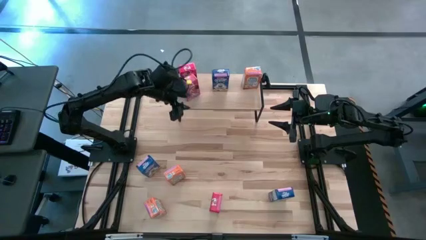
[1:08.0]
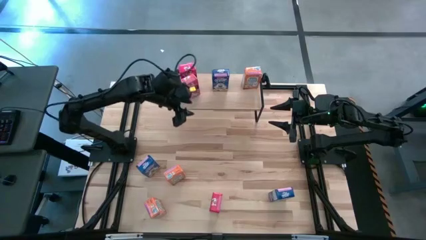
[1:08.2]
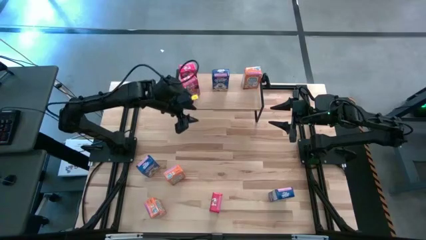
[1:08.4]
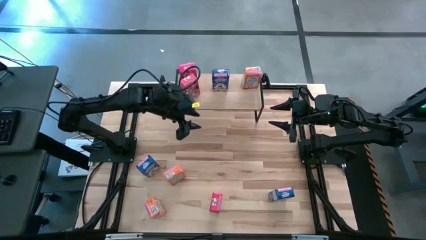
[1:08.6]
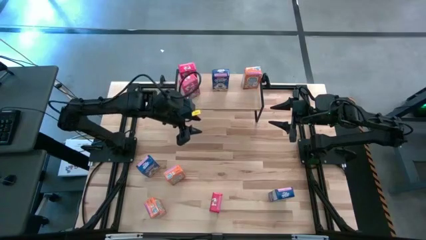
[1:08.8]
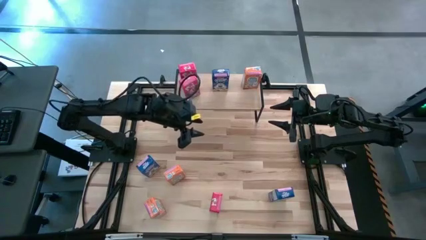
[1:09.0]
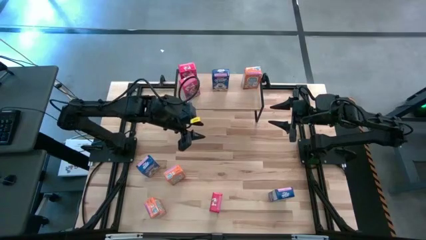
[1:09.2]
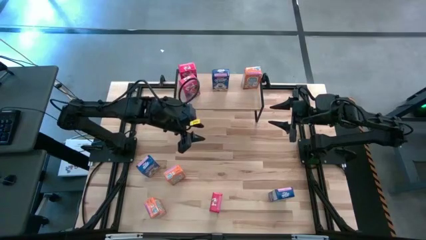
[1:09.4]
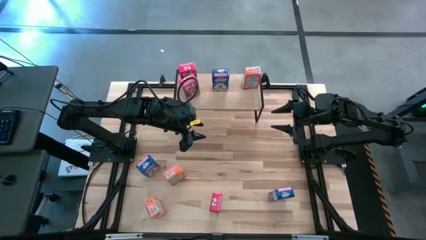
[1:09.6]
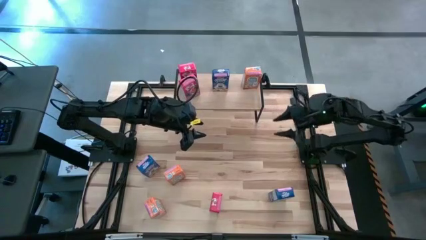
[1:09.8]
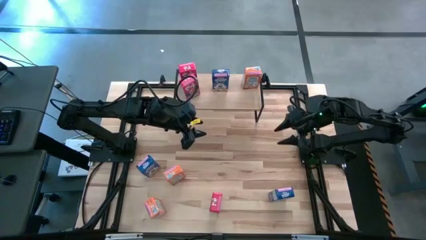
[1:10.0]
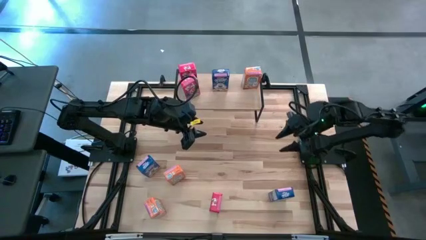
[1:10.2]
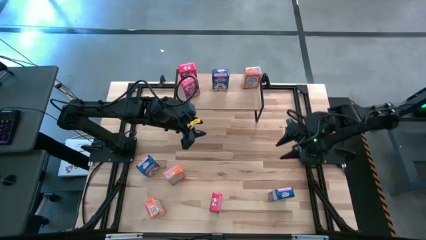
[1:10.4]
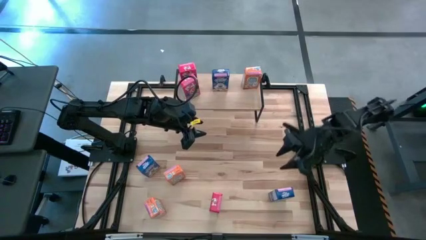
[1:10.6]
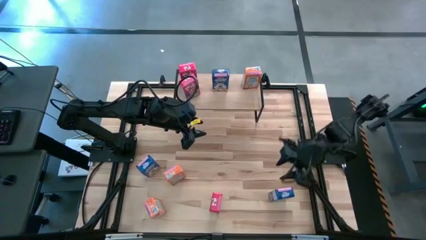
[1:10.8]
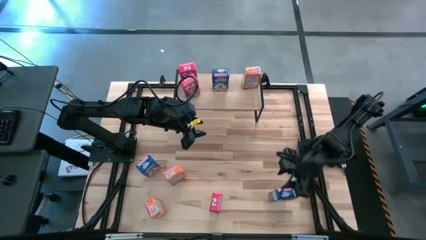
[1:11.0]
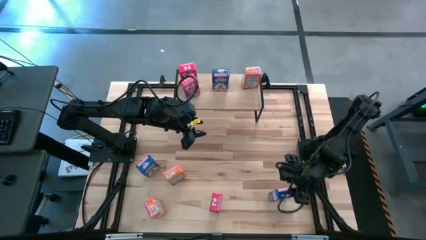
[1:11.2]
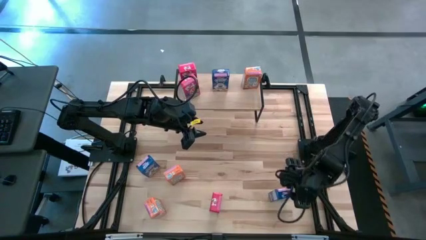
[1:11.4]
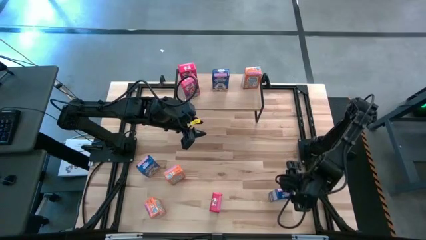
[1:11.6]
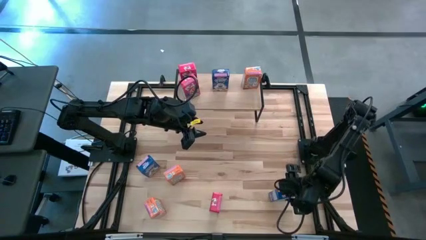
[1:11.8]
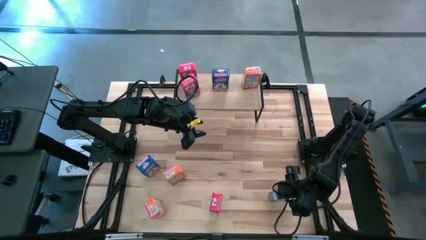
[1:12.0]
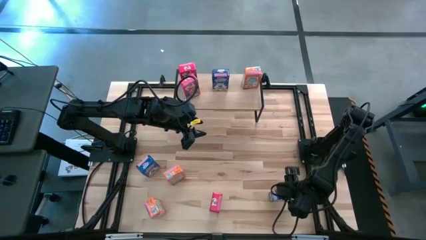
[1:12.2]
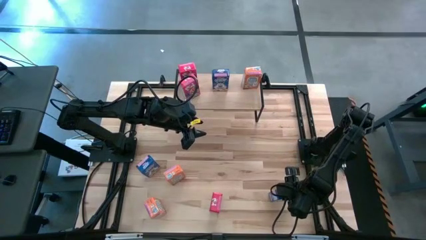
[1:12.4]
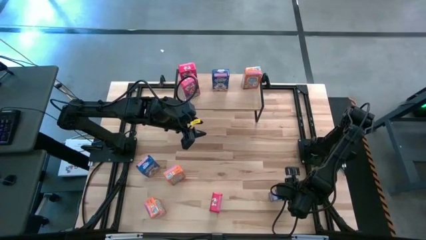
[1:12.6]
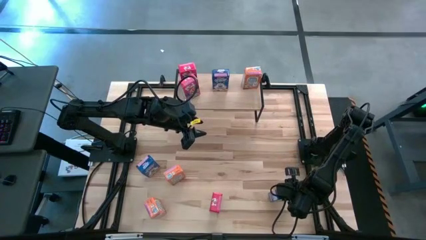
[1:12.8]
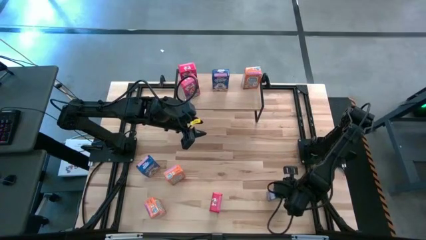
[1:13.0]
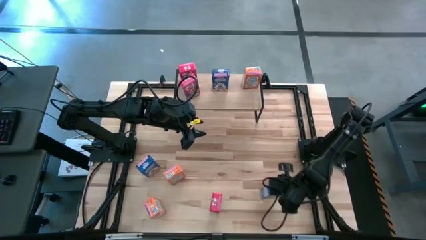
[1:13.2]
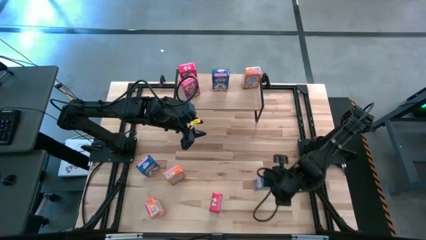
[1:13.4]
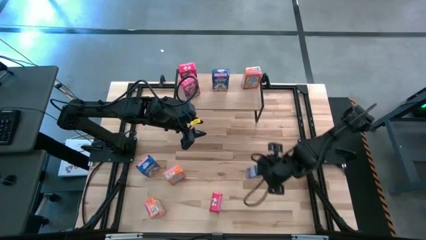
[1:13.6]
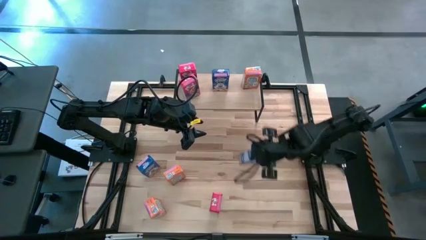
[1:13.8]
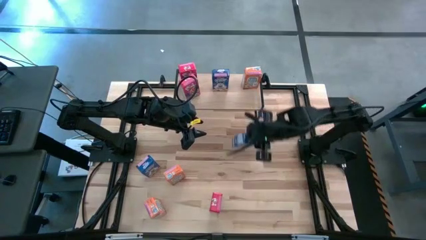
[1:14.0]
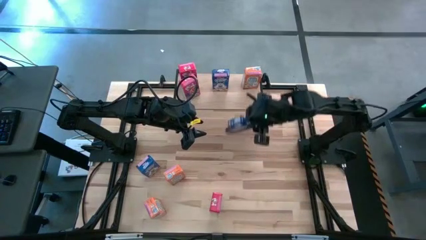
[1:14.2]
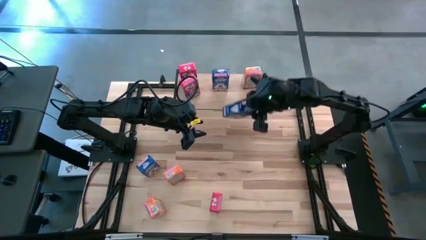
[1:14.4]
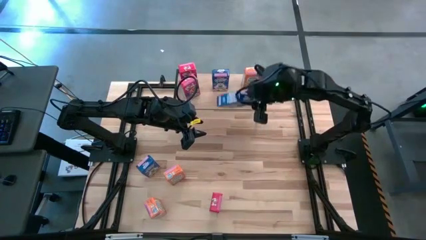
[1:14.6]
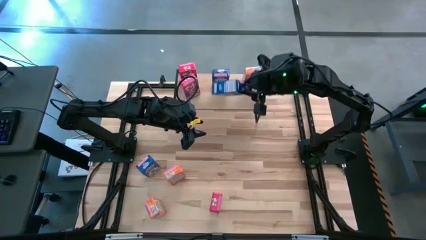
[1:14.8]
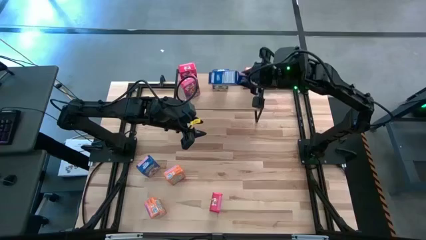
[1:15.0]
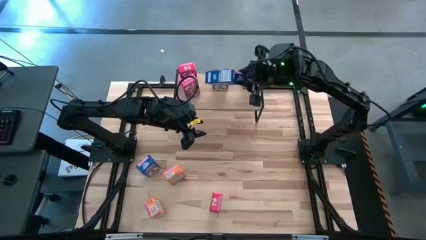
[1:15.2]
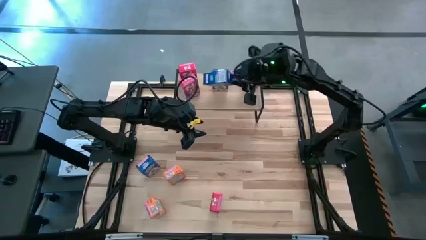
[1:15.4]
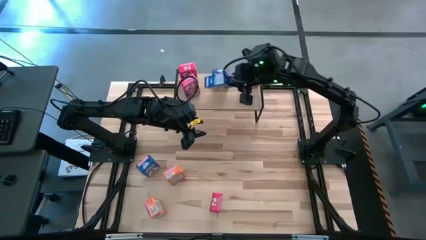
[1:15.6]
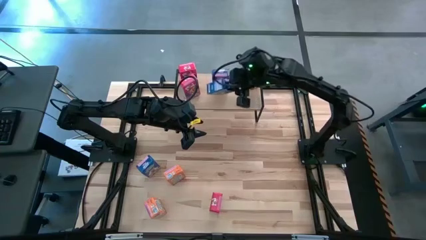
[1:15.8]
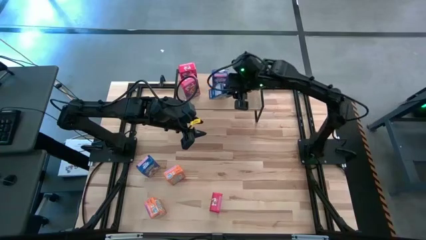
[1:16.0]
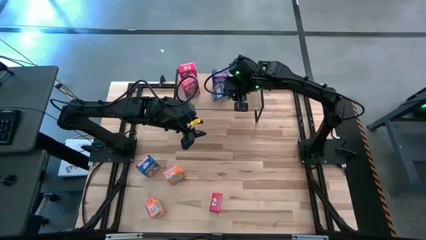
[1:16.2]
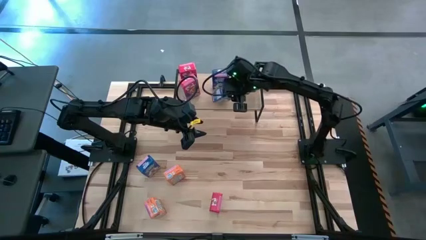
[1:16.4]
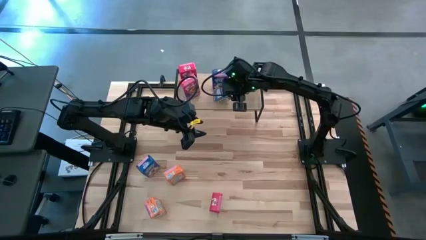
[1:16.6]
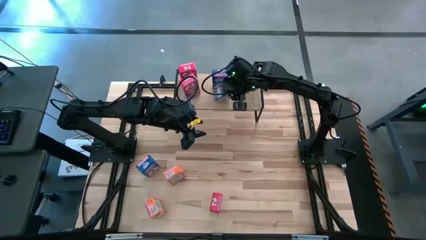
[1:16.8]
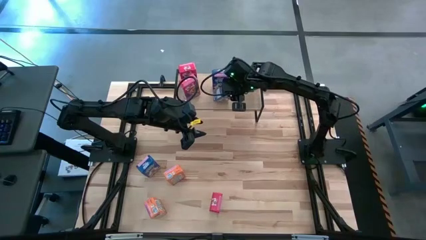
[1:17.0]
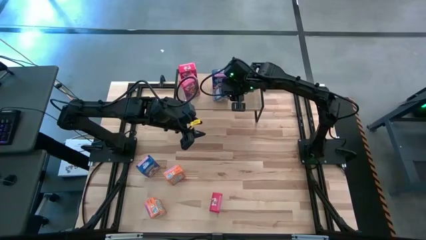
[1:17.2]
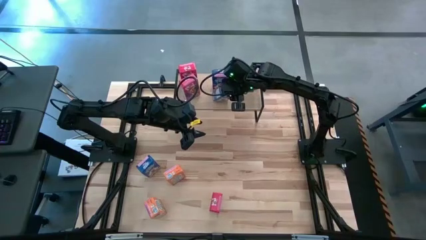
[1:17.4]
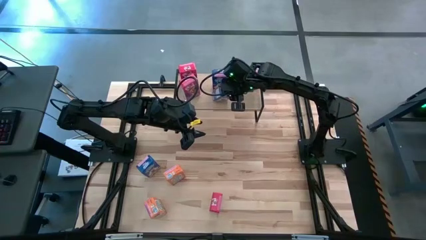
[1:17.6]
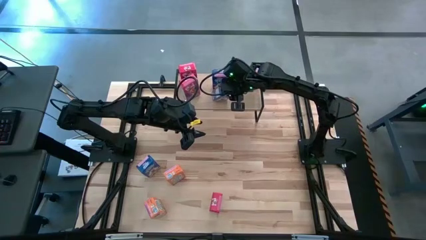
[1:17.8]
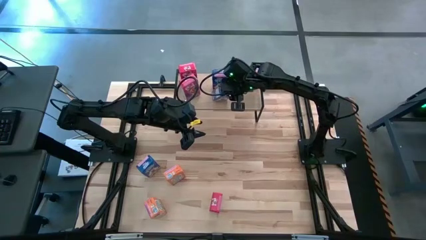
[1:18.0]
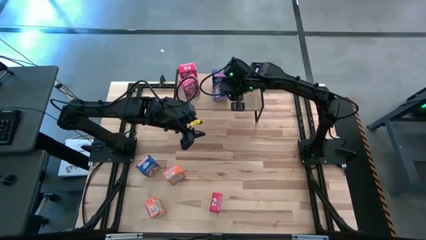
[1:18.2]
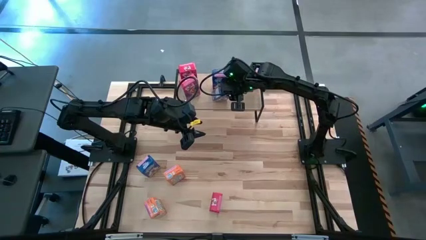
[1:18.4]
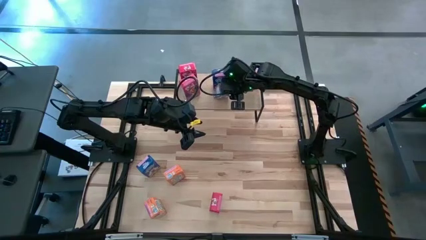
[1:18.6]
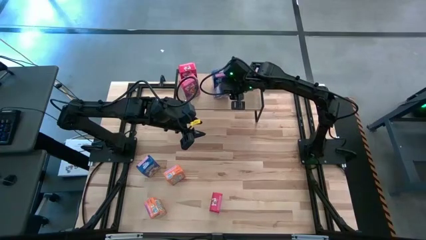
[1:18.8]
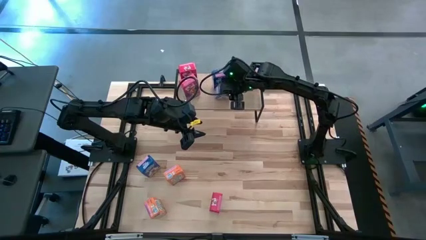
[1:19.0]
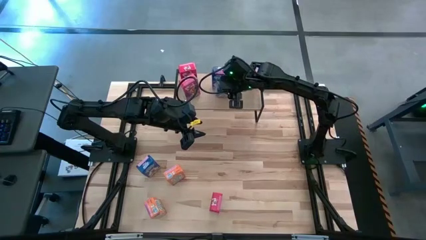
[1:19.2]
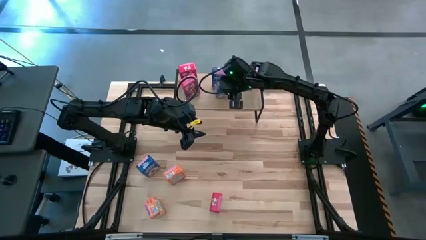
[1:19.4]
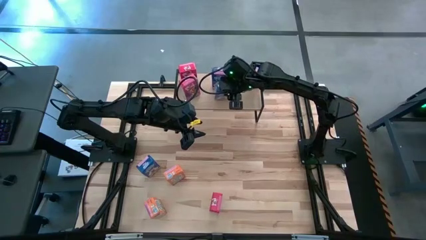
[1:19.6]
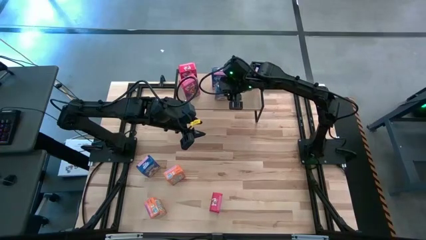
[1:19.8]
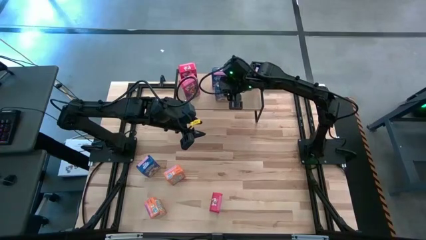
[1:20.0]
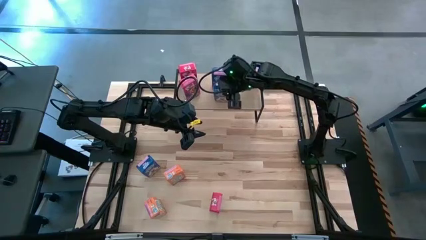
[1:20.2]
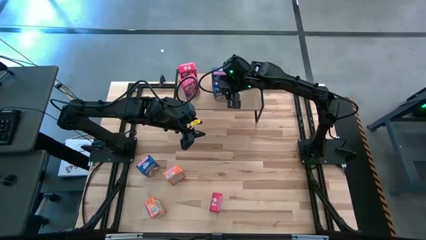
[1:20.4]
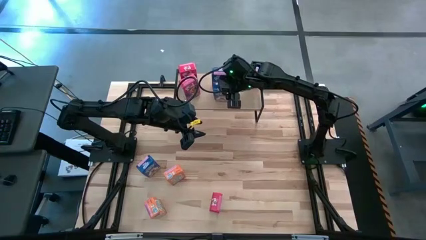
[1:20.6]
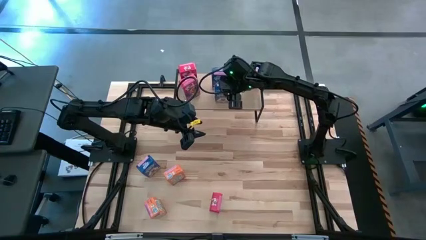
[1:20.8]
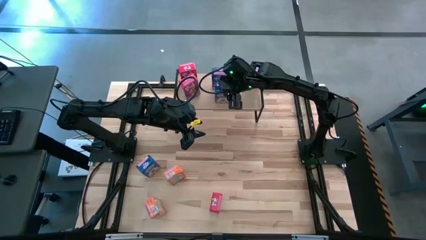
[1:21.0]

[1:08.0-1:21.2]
Task: Stack cereal on shelf
Put the right blue cereal box on the shelf aligned with the other blue cereal box
